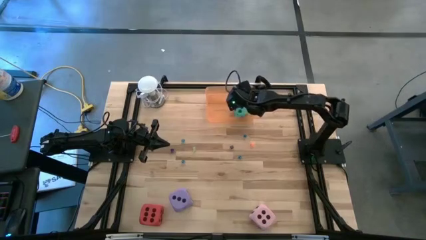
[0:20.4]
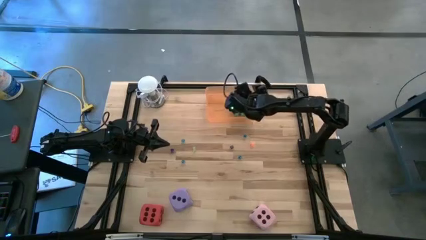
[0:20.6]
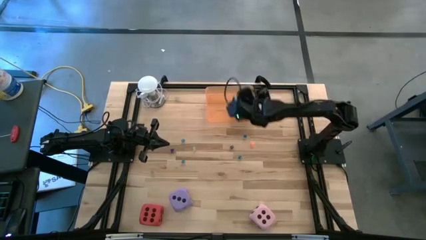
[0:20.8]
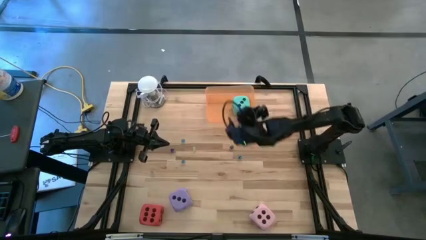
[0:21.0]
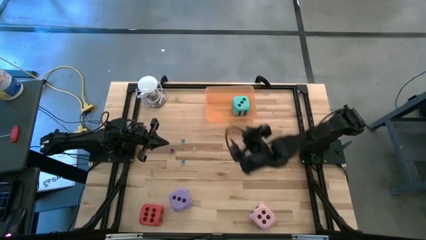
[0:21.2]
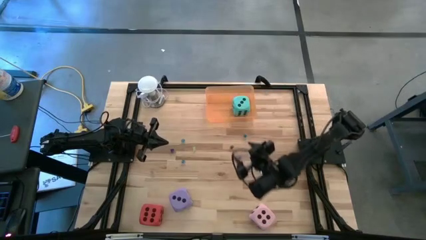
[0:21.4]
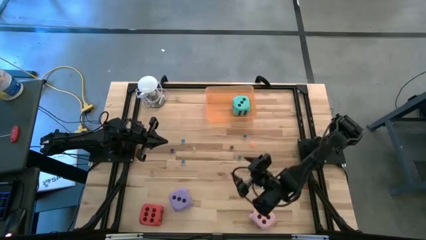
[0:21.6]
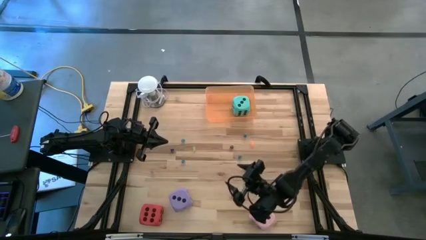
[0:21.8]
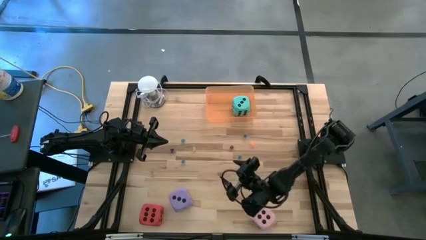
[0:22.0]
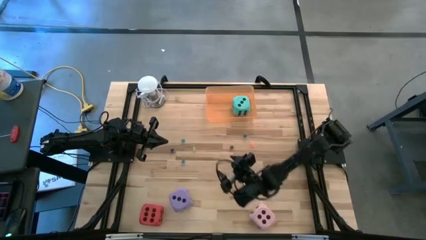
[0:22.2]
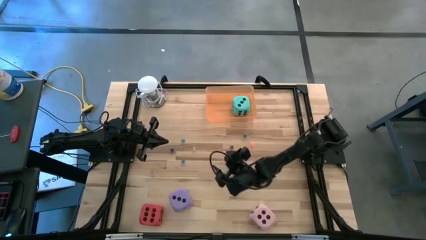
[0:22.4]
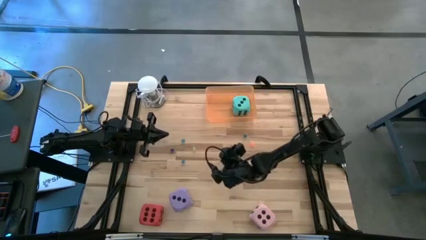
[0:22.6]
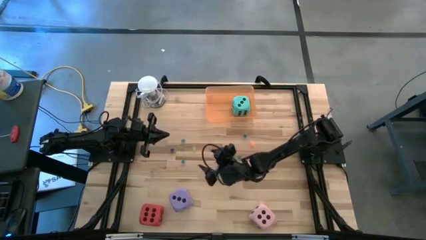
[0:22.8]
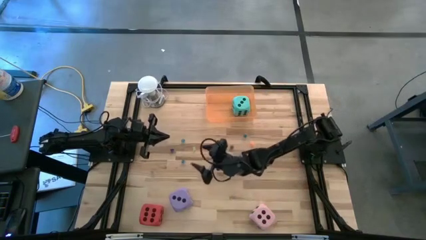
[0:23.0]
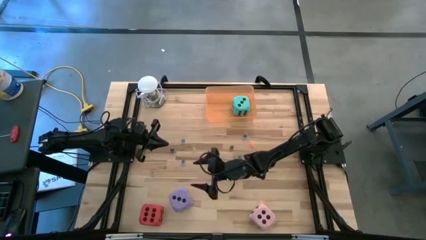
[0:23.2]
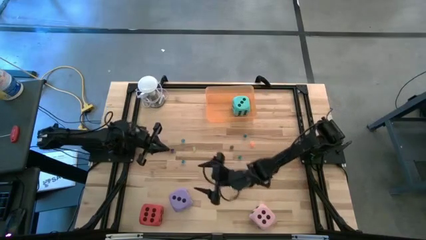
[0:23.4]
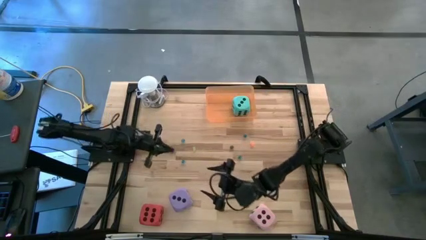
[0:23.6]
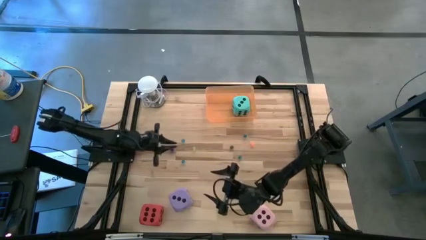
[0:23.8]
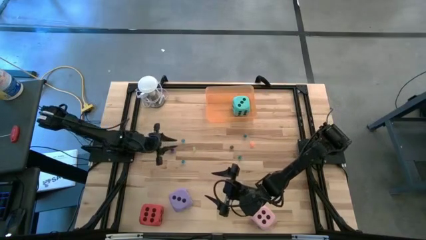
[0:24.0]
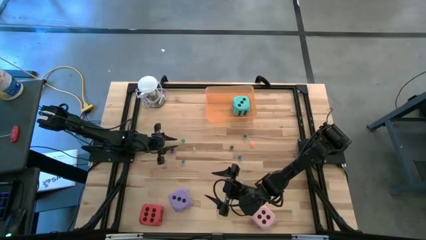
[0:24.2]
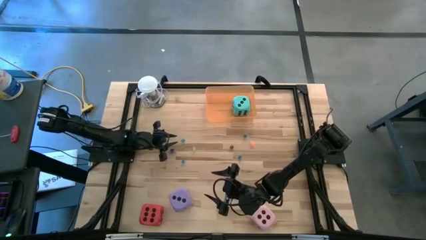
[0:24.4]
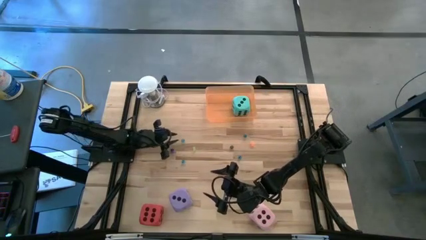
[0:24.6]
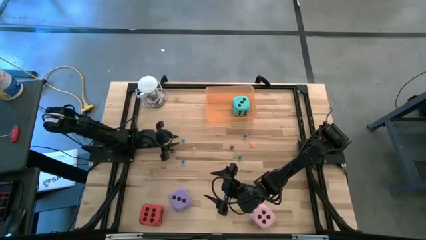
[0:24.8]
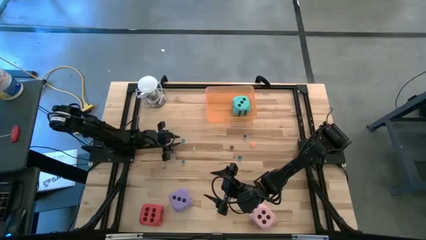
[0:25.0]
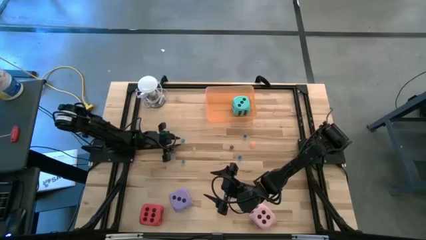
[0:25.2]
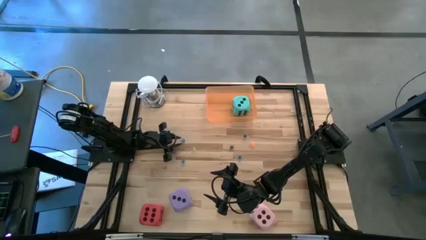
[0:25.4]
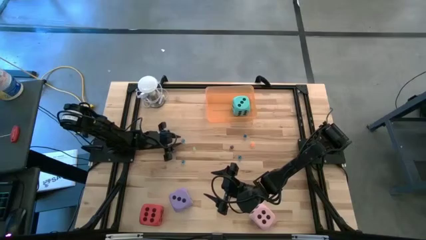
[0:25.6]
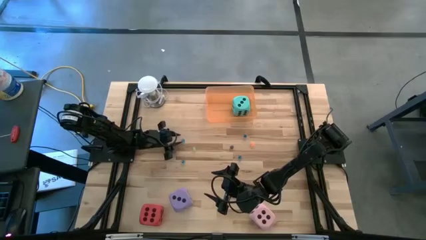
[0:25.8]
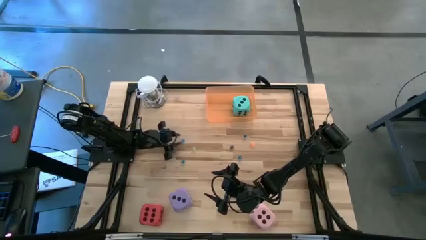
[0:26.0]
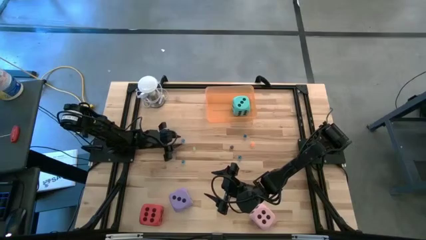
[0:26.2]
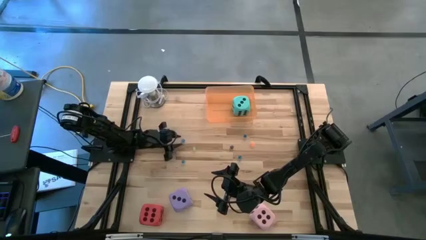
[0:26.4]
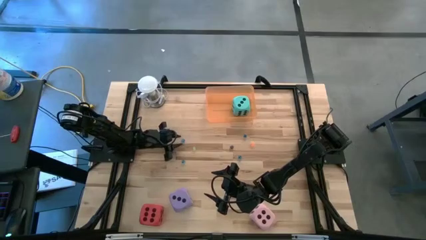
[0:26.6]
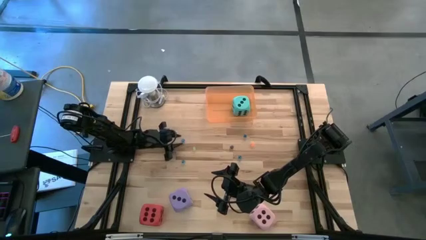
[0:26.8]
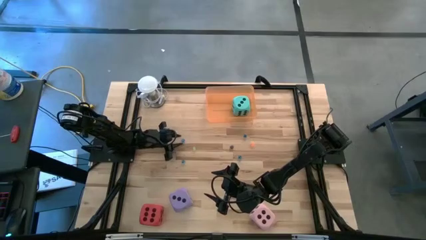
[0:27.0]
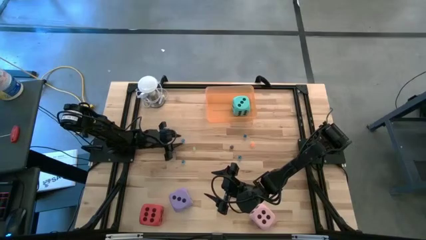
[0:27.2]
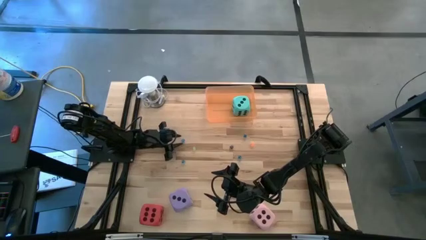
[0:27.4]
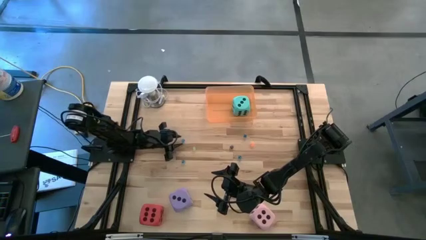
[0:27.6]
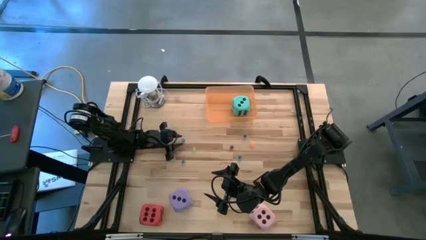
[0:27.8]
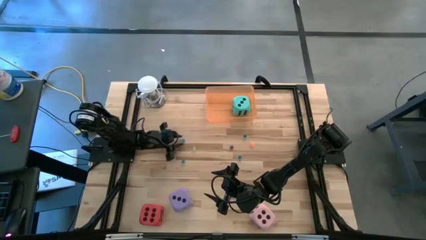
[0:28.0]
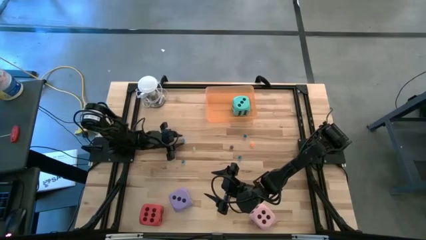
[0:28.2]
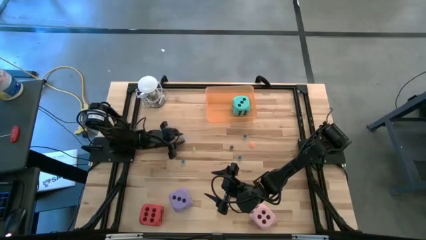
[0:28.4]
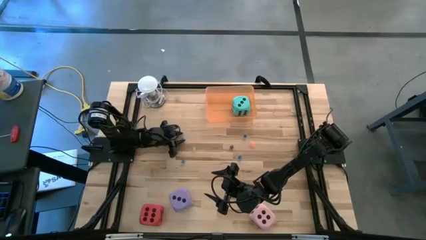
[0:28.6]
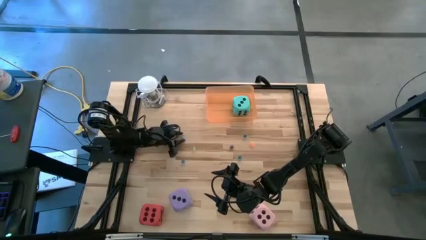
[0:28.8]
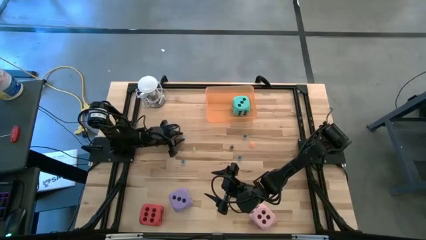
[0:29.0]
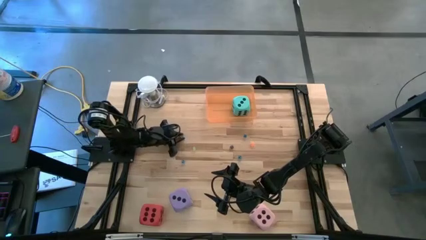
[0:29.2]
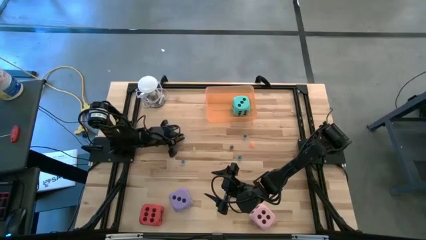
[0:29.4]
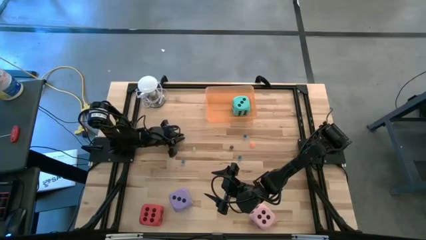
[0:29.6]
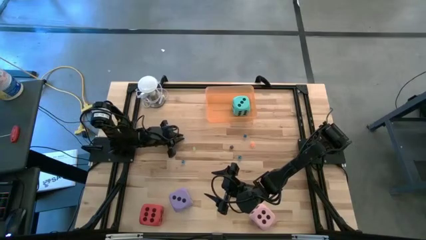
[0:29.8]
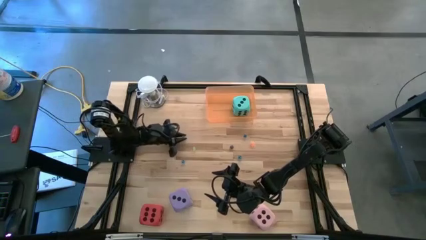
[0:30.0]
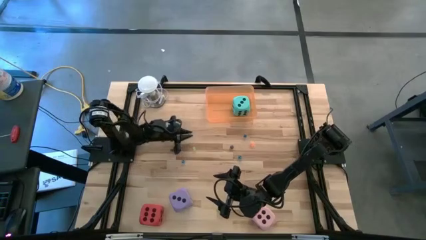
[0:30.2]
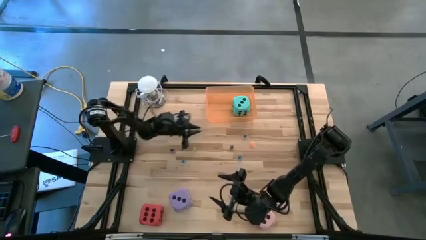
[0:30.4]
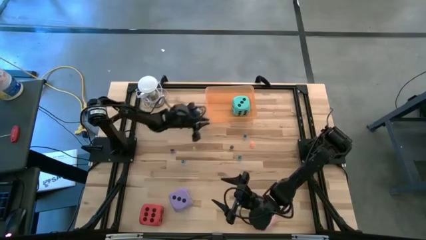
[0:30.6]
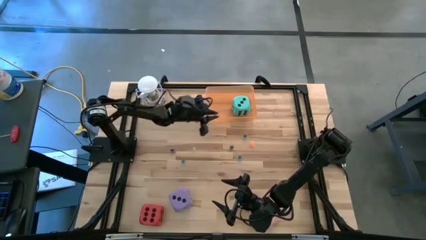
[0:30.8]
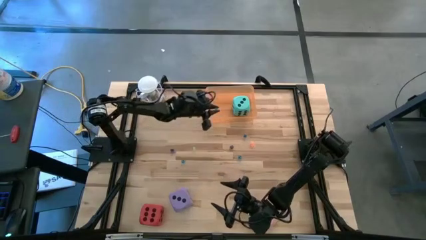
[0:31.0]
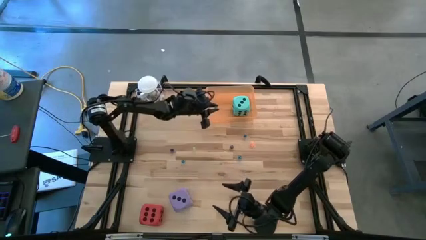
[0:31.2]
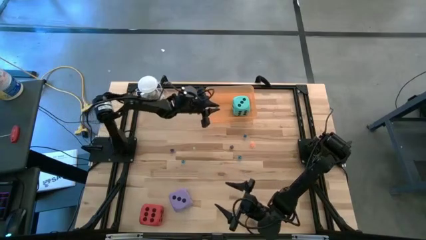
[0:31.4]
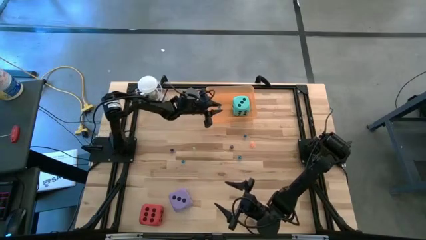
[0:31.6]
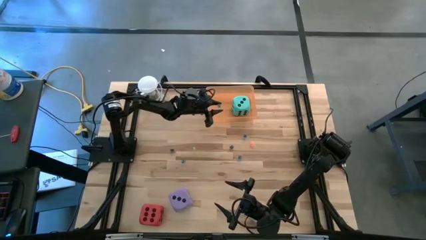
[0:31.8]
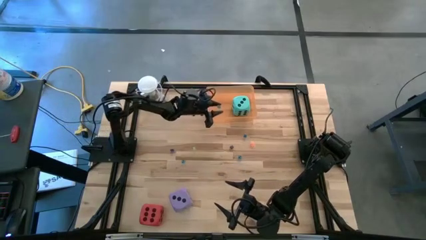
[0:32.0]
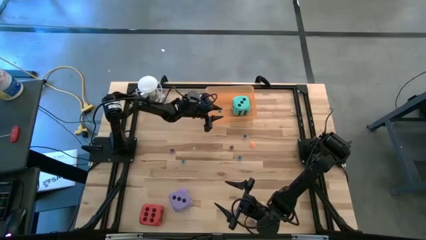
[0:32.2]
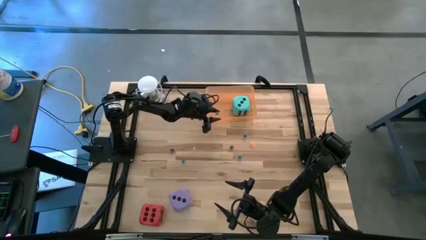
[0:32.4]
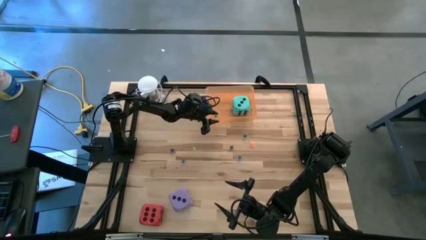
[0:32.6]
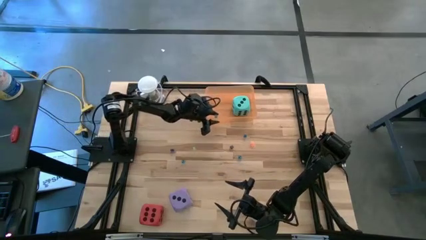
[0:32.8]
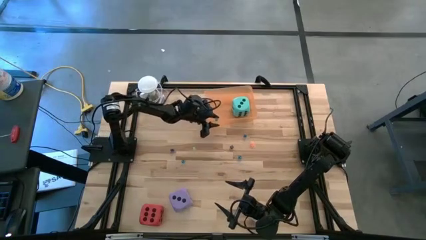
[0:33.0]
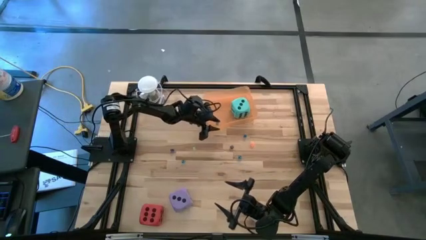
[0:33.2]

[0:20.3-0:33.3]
Task: Pick & Place Dice
Put the small light blue die into the orange bin
